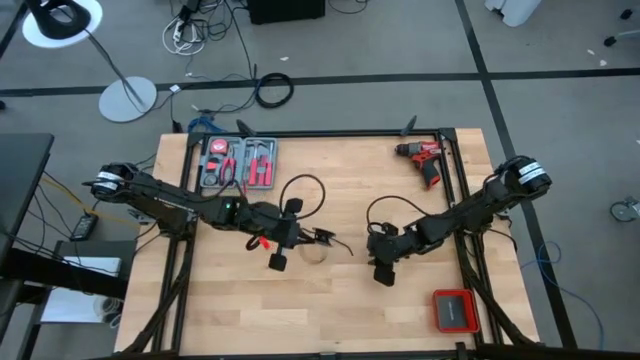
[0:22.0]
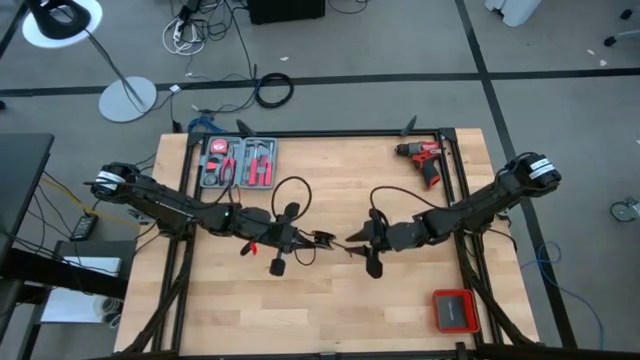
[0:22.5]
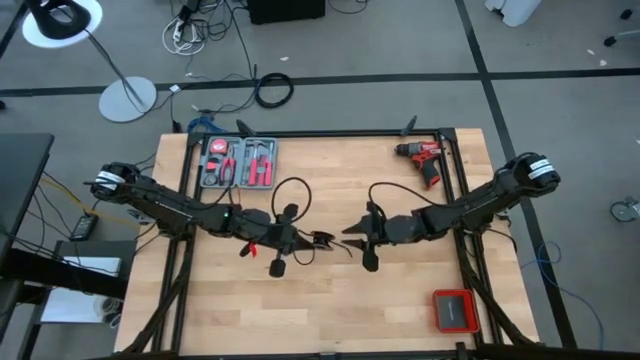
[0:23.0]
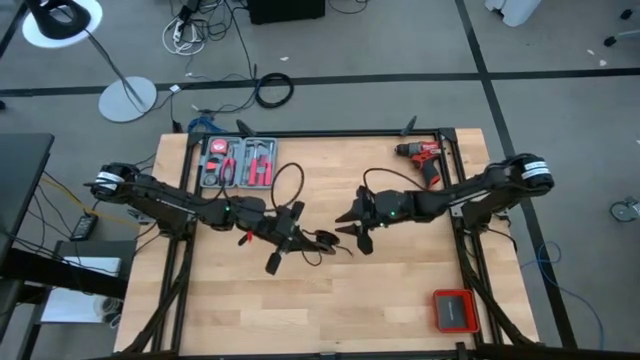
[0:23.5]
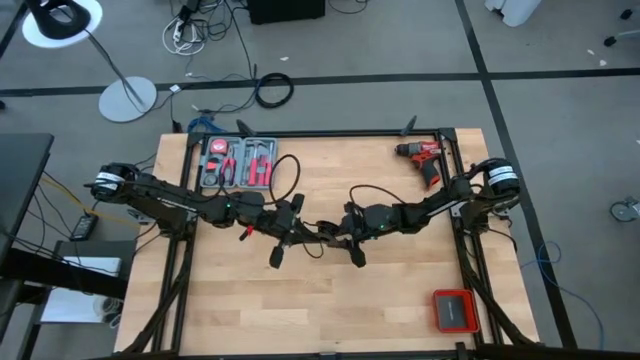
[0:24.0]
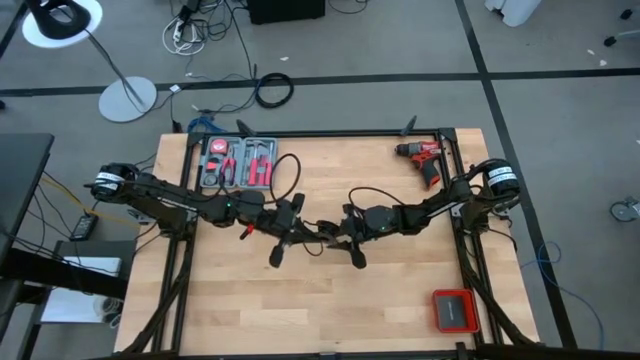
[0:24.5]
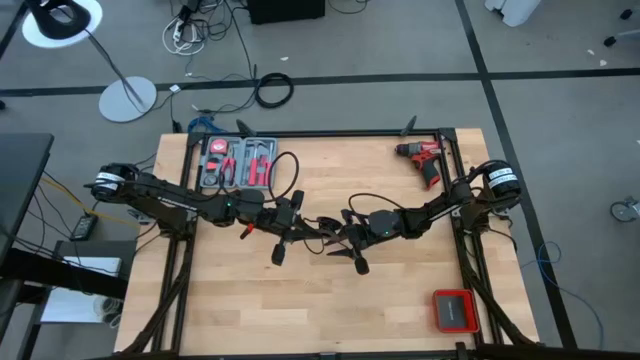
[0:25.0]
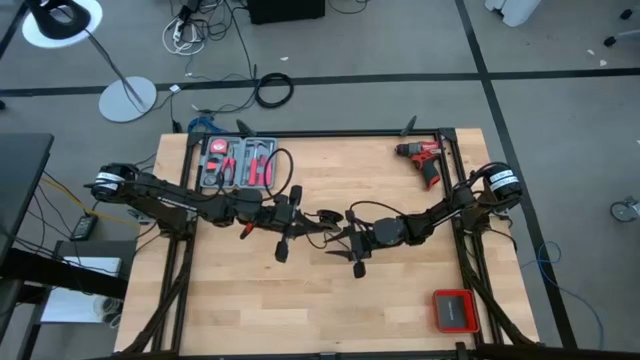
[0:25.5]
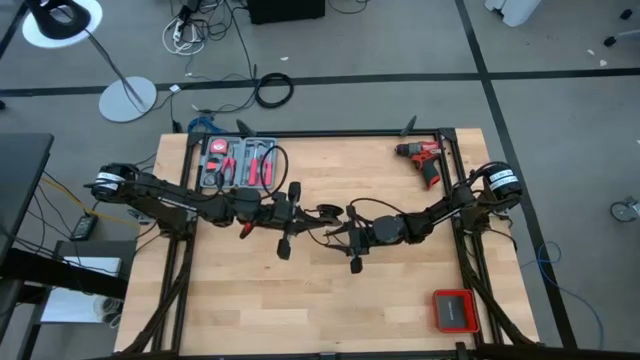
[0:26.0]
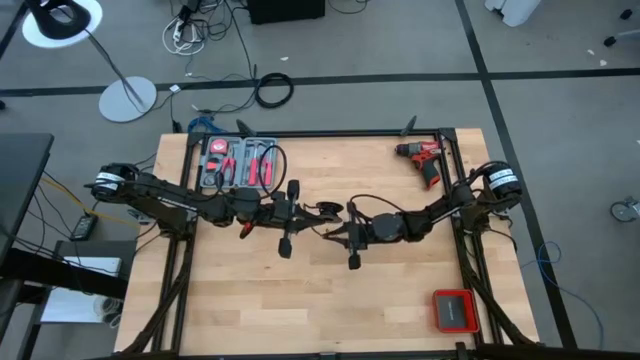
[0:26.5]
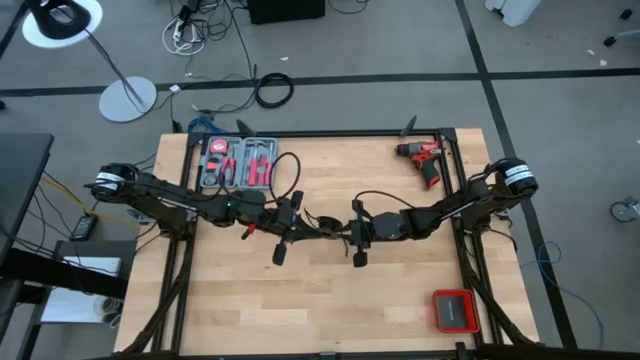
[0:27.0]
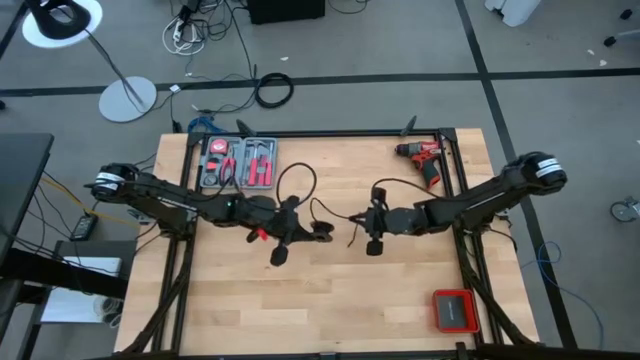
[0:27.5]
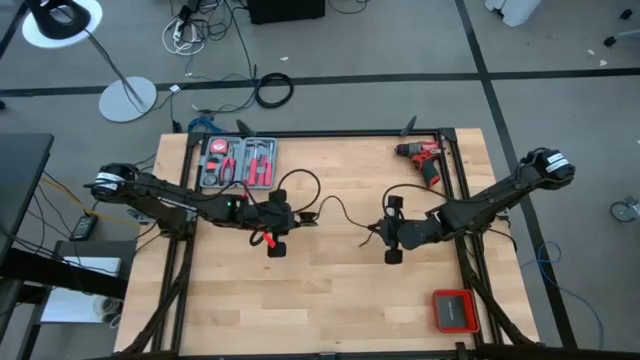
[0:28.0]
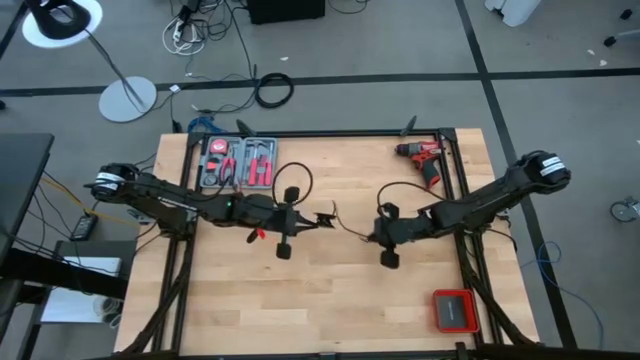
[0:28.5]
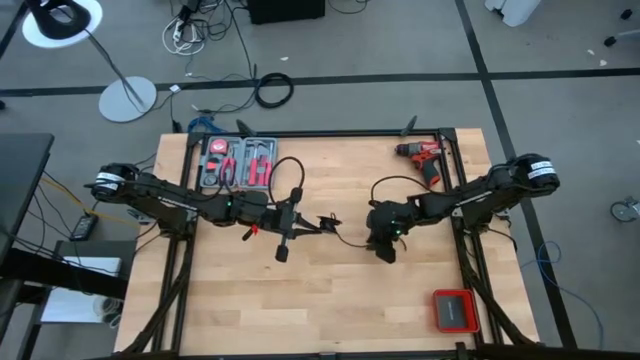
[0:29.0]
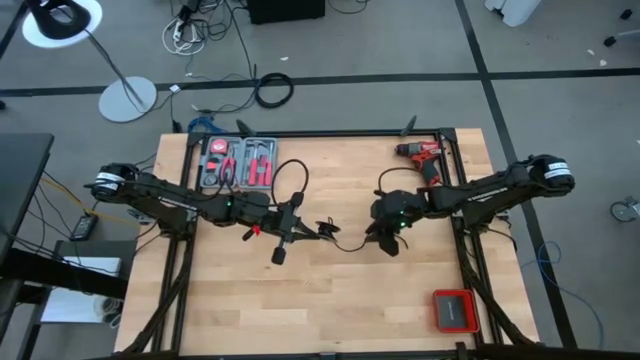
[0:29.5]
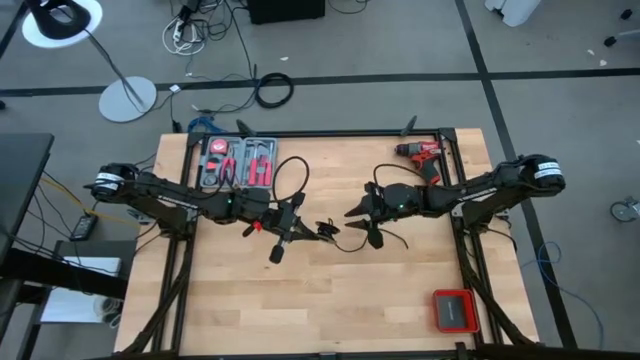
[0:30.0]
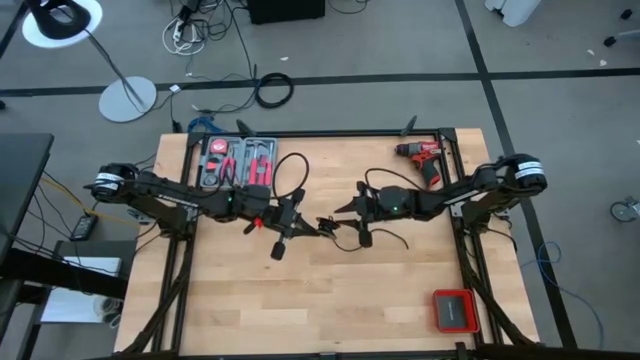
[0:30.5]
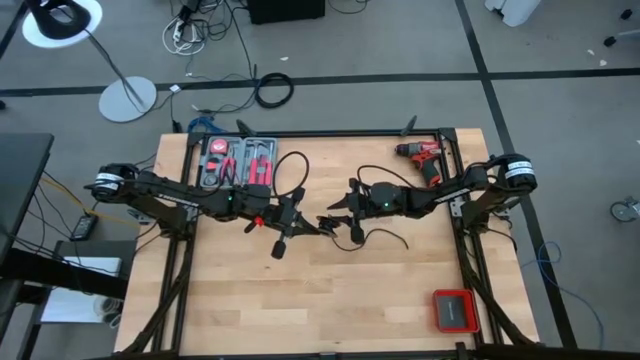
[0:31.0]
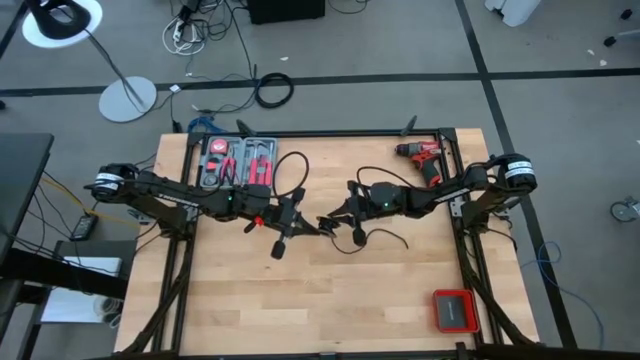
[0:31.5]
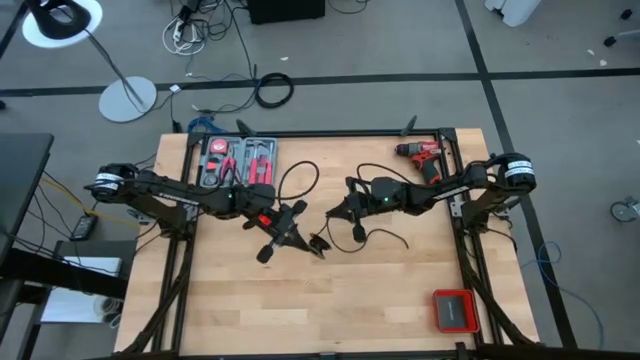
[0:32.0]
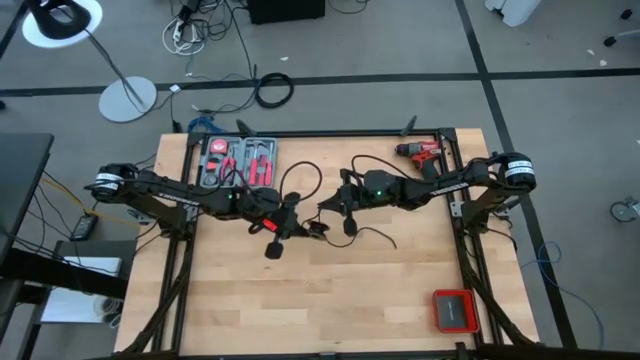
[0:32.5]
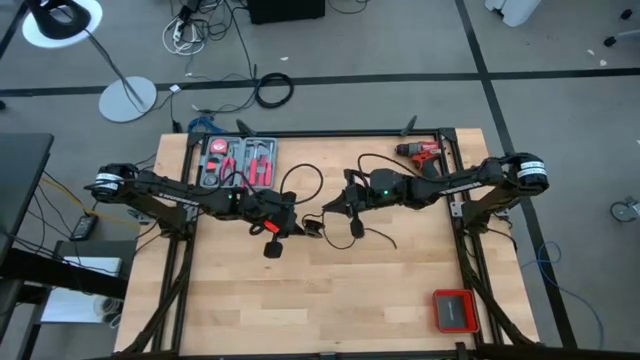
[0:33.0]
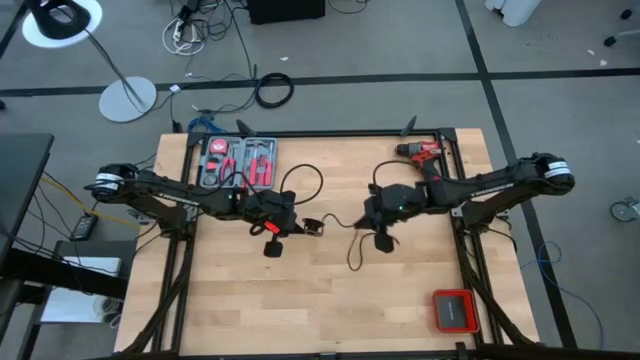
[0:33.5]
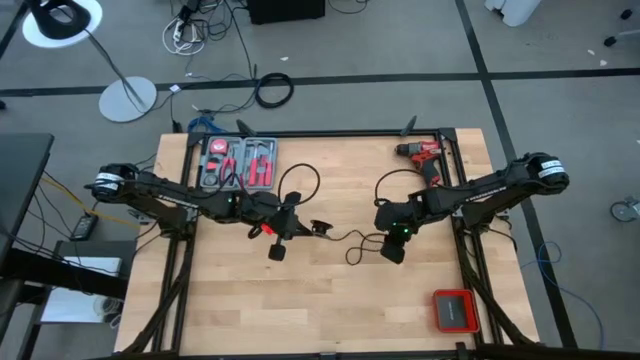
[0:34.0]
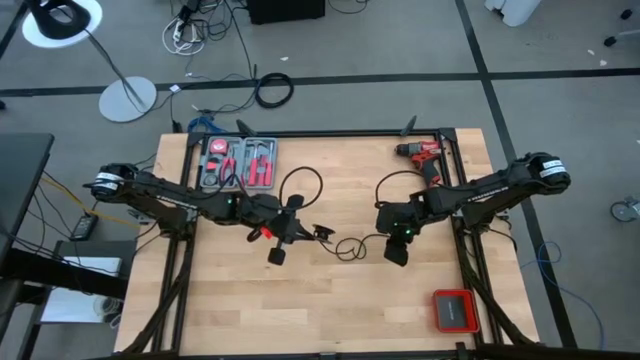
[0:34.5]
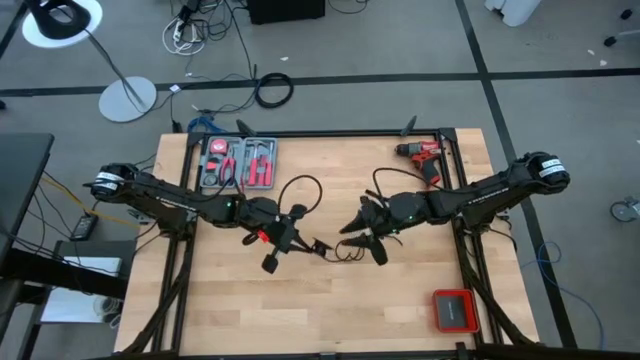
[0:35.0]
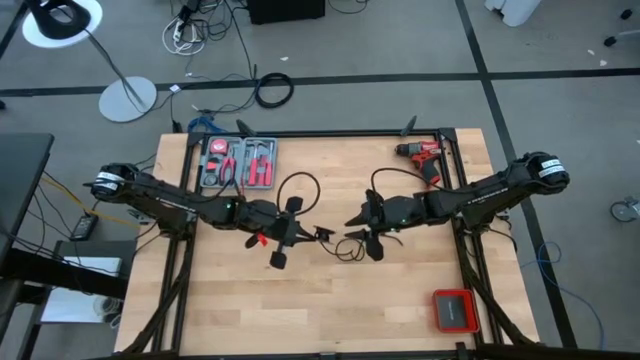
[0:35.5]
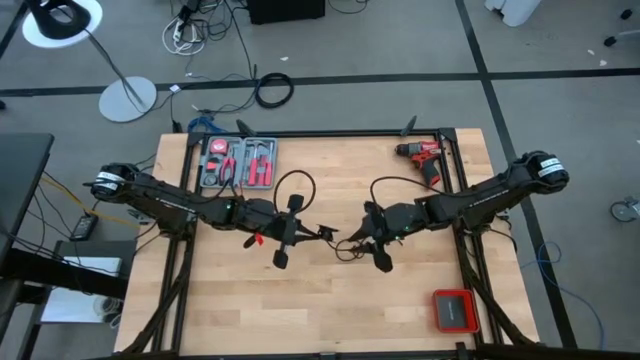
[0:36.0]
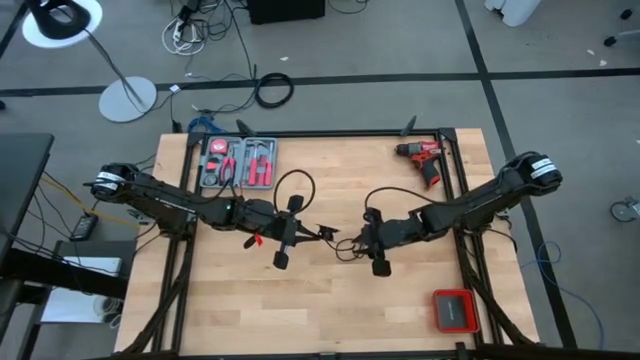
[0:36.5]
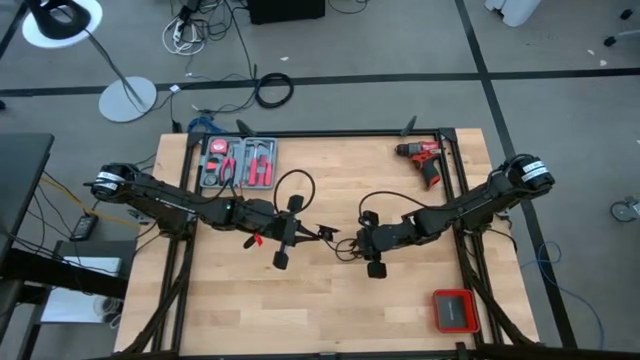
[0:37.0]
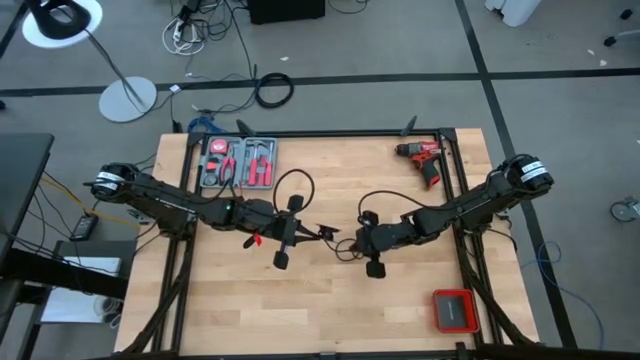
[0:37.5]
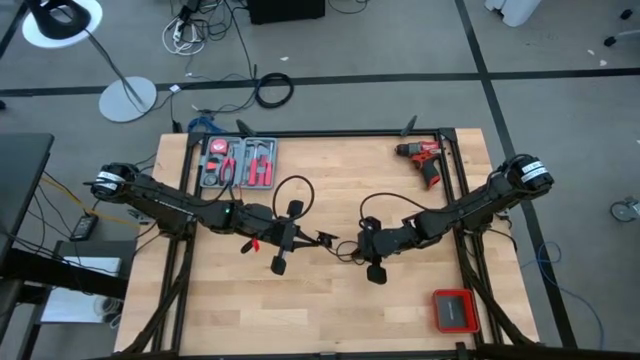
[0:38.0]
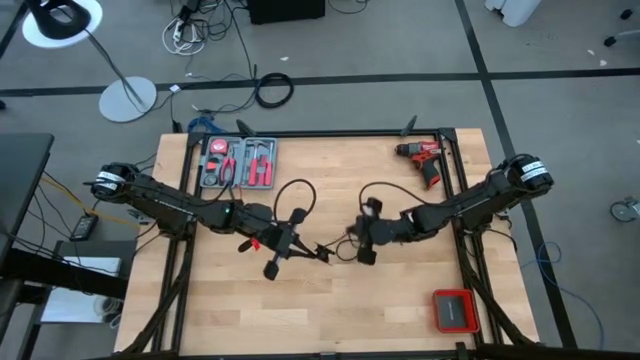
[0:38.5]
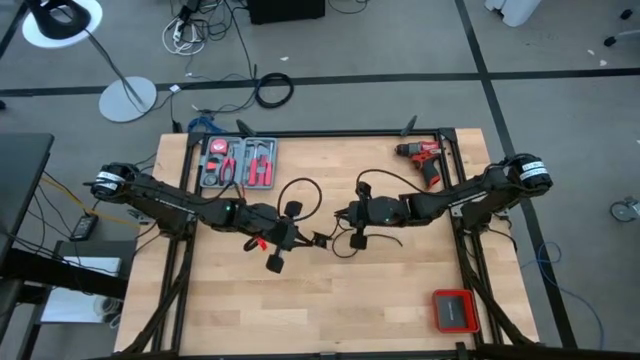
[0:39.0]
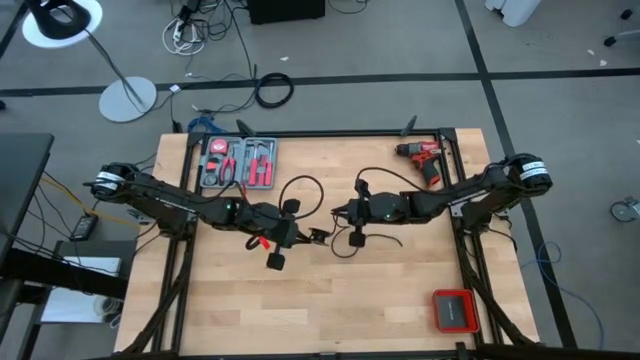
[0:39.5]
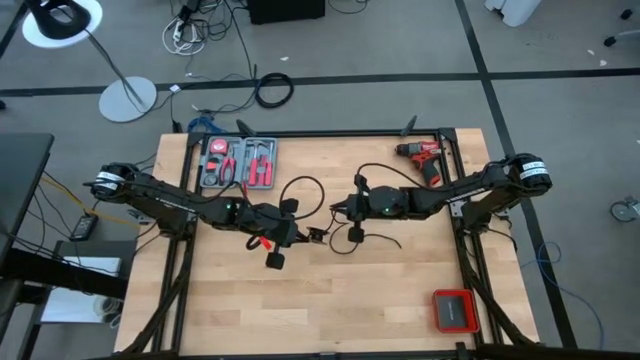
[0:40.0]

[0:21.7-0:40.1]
Task: Coil cords
Uncoil the black wire from the black spool

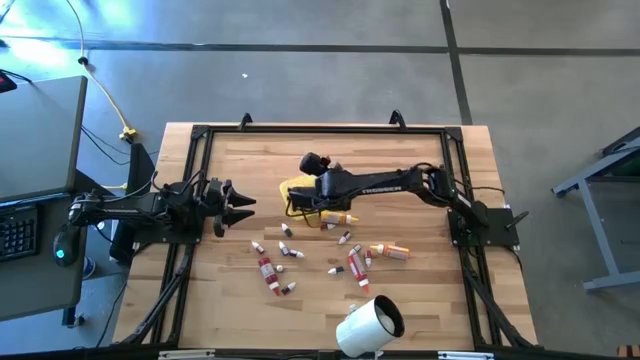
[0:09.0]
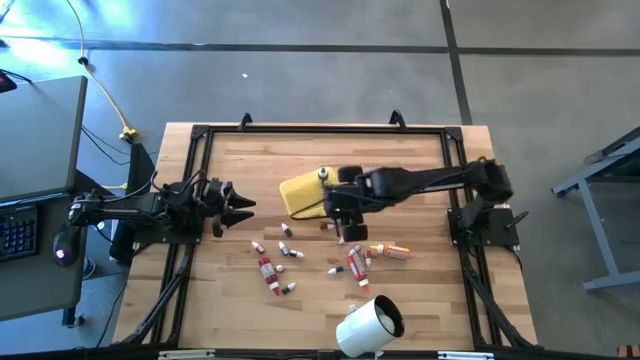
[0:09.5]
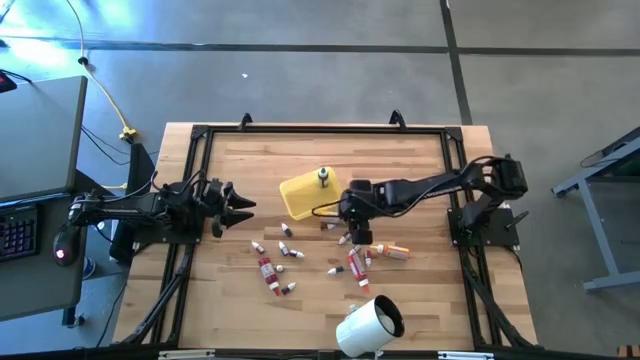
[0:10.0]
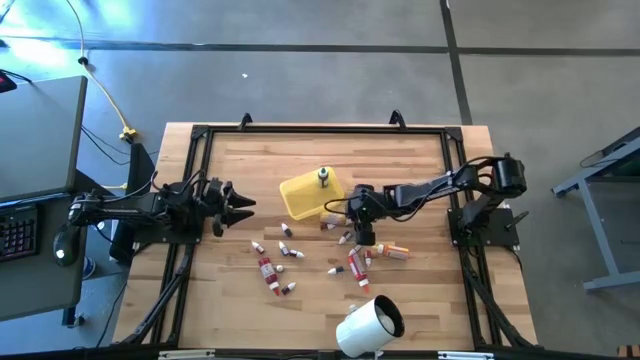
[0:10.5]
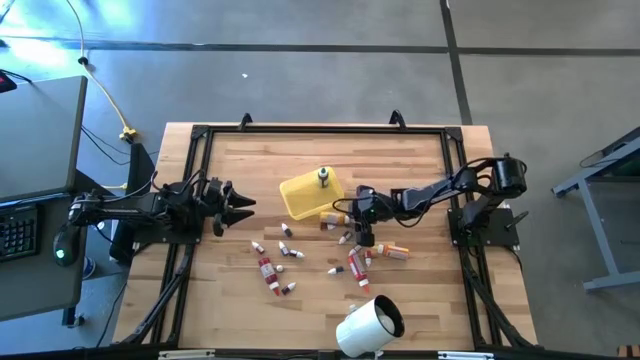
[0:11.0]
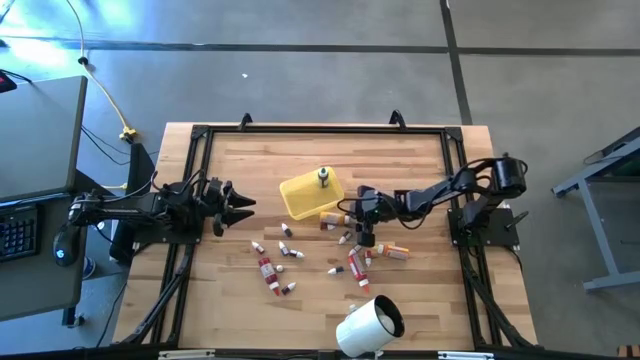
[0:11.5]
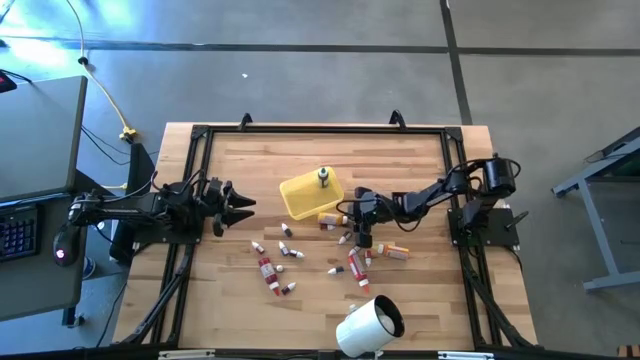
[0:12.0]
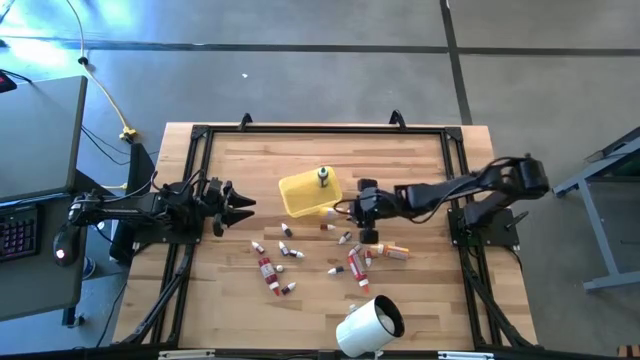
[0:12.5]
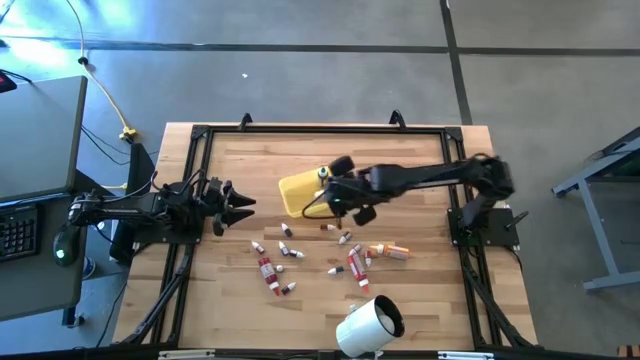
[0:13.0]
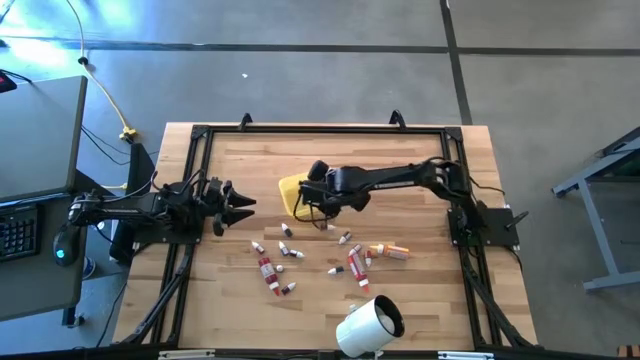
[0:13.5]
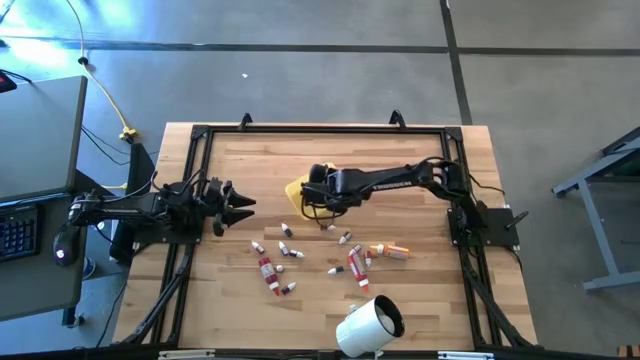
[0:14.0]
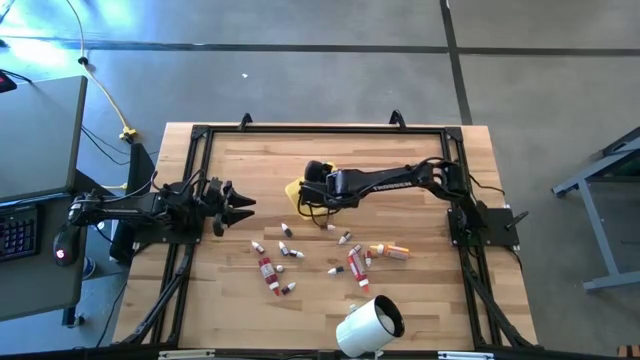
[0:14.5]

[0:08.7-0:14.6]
Task: Pick & Place food coloring
Put the top large yellow food coloring bottle into the yellow container
